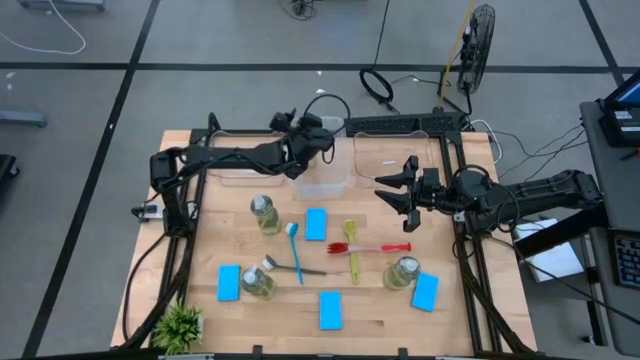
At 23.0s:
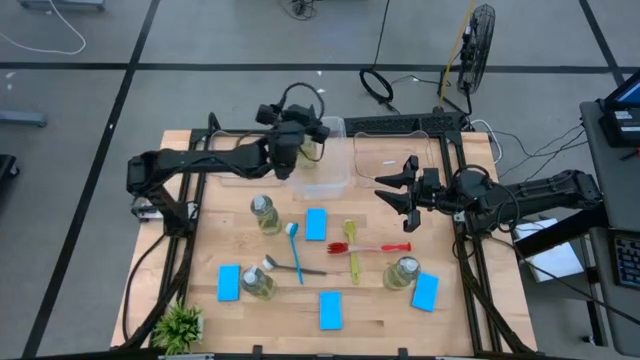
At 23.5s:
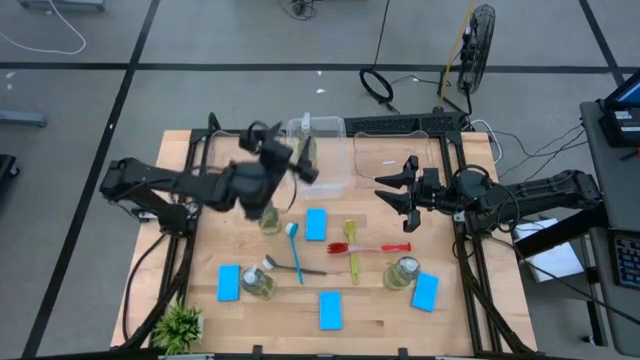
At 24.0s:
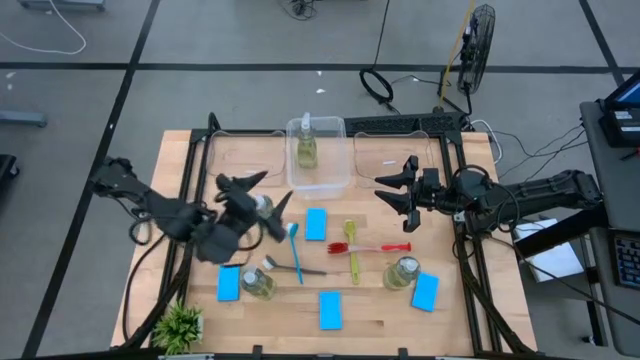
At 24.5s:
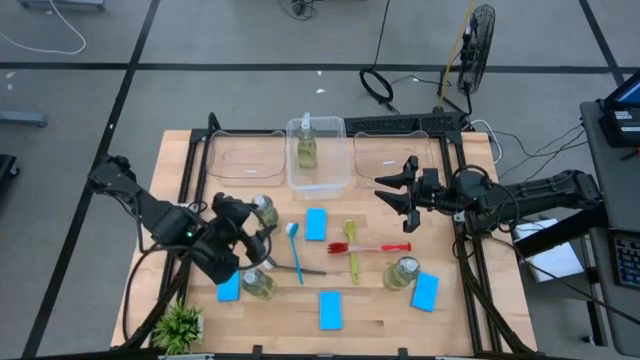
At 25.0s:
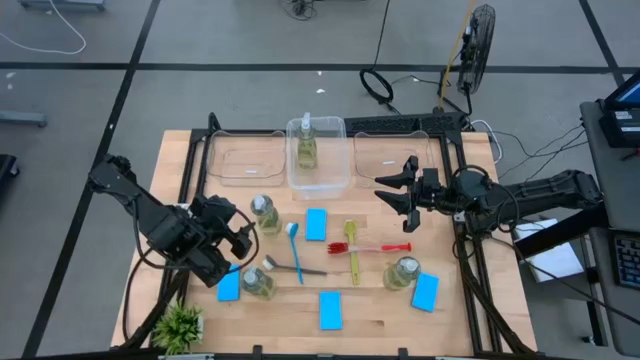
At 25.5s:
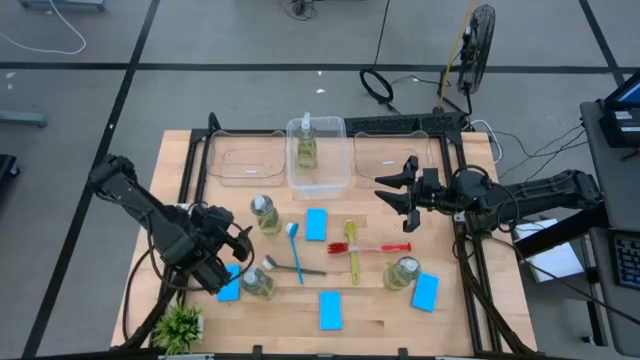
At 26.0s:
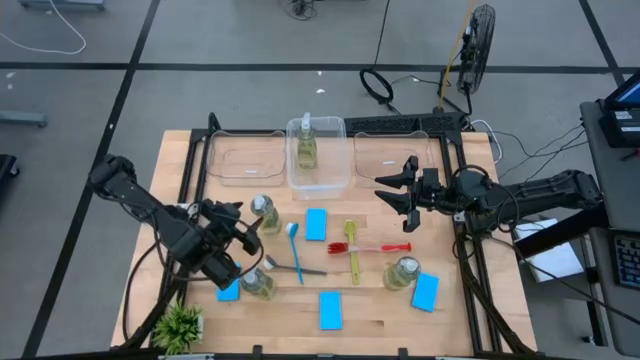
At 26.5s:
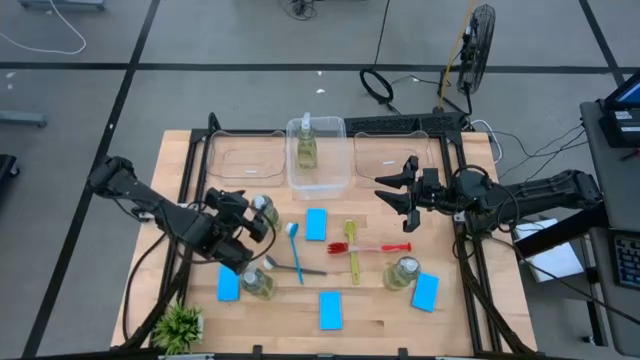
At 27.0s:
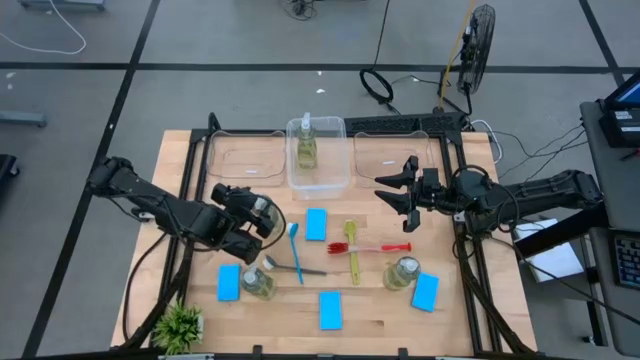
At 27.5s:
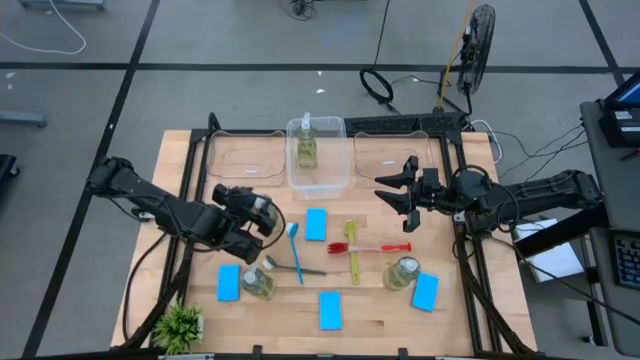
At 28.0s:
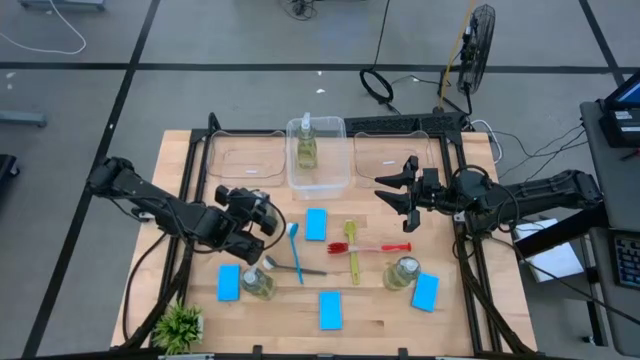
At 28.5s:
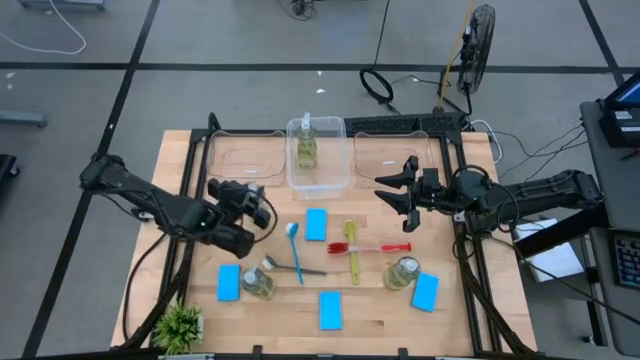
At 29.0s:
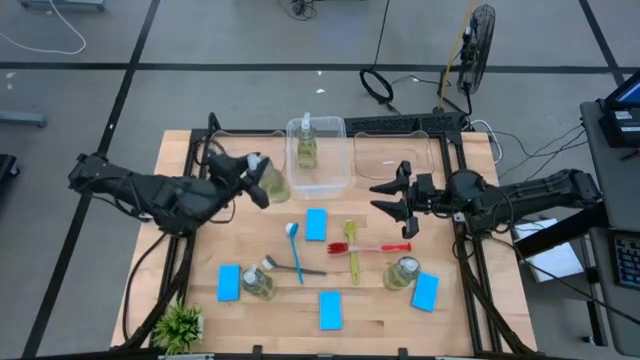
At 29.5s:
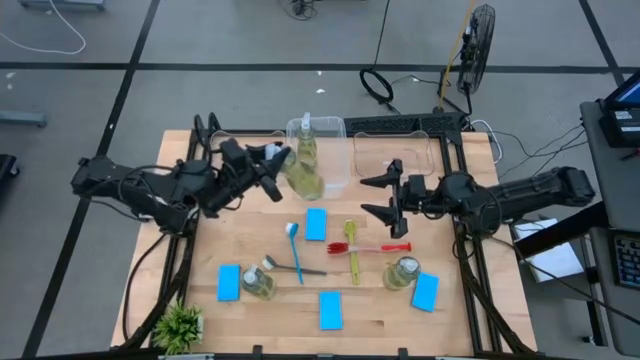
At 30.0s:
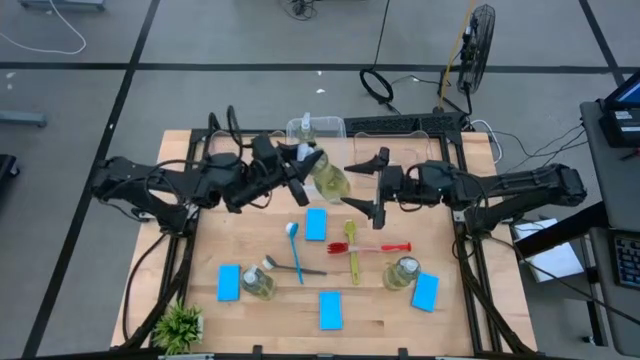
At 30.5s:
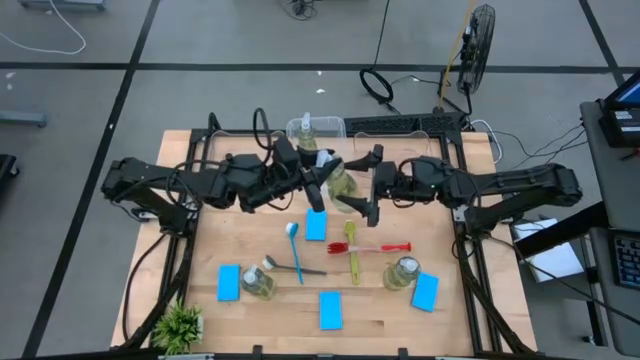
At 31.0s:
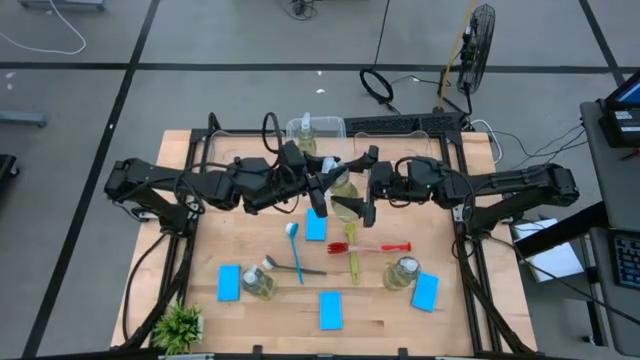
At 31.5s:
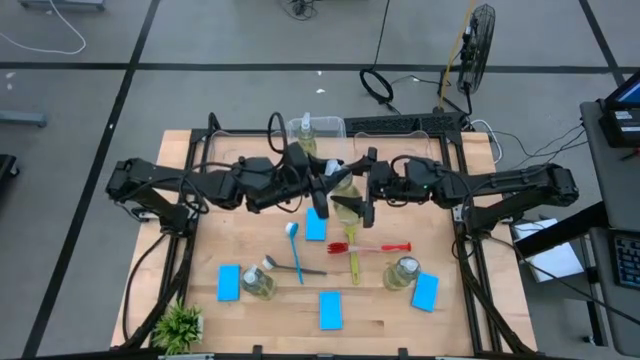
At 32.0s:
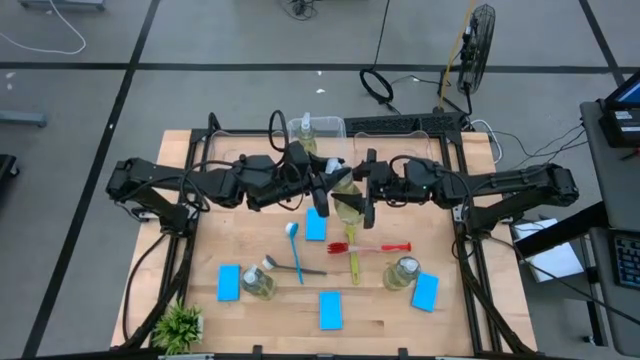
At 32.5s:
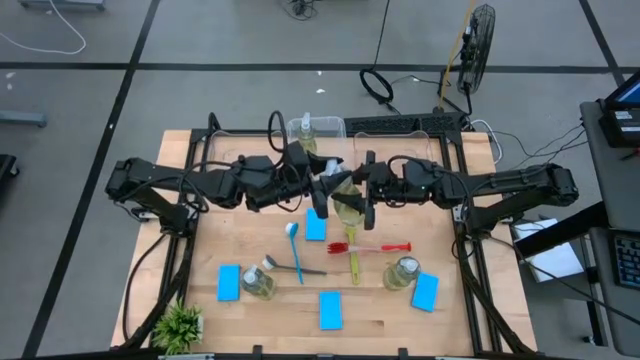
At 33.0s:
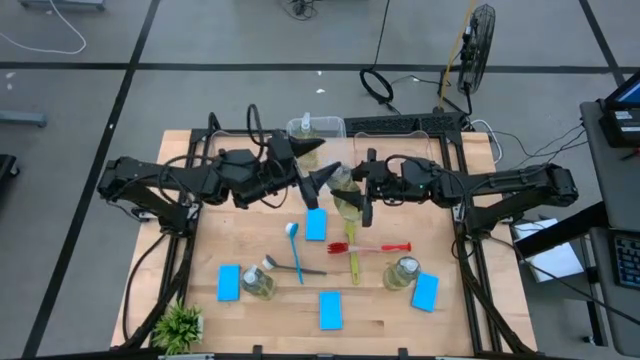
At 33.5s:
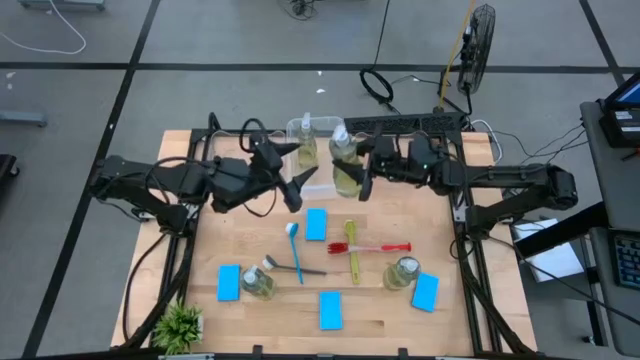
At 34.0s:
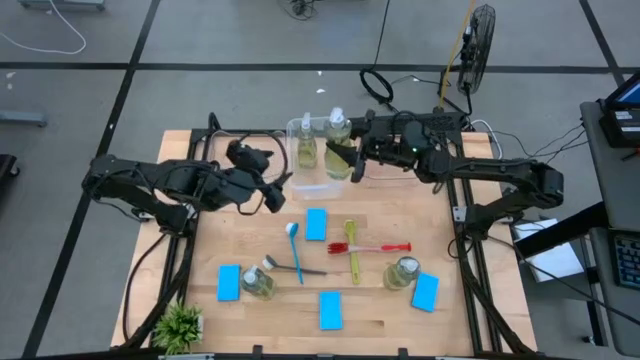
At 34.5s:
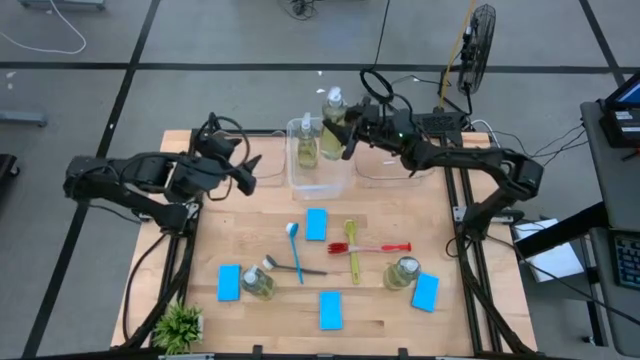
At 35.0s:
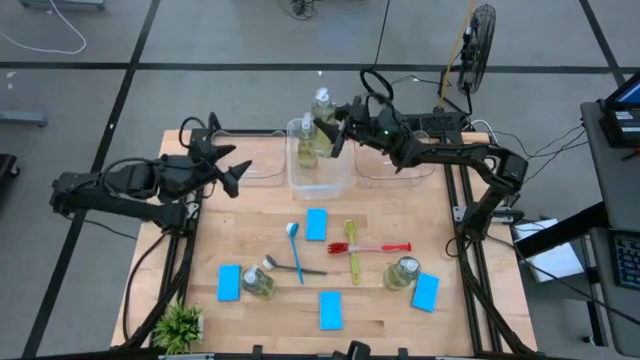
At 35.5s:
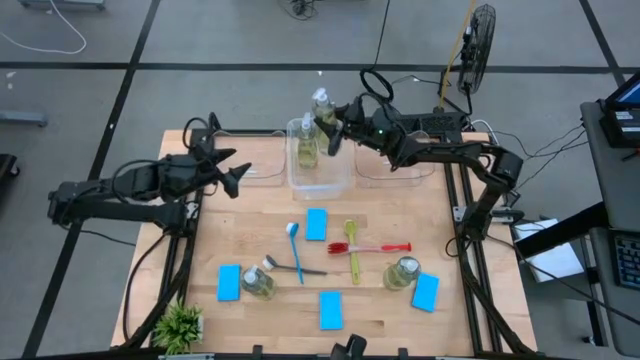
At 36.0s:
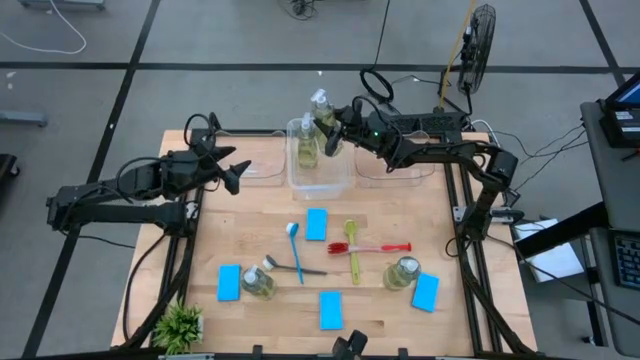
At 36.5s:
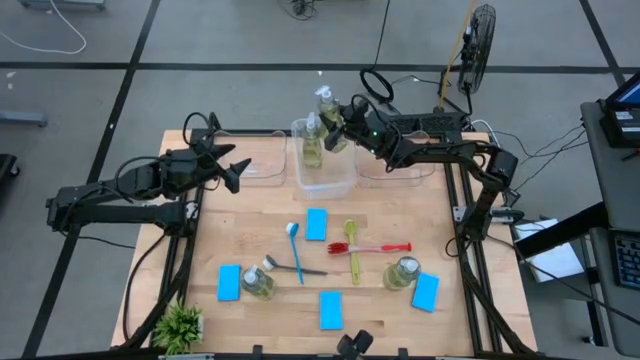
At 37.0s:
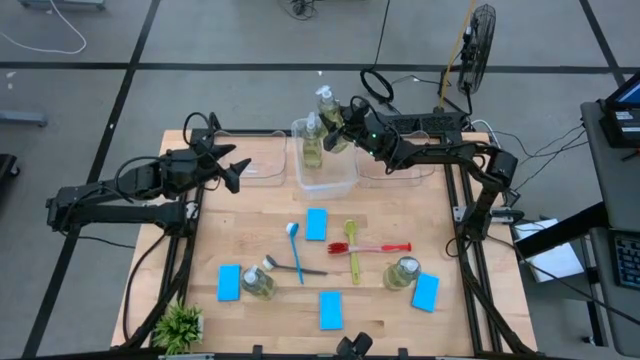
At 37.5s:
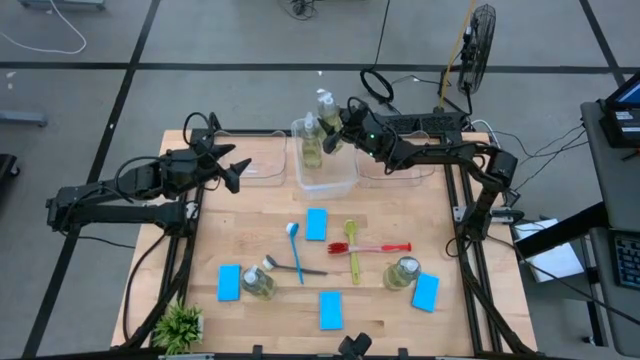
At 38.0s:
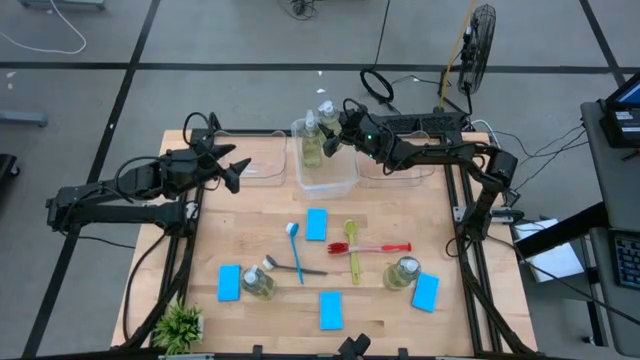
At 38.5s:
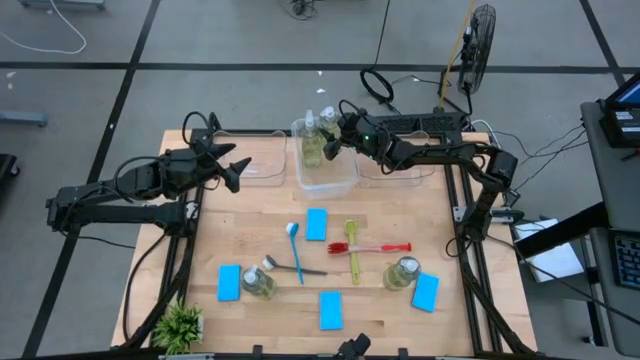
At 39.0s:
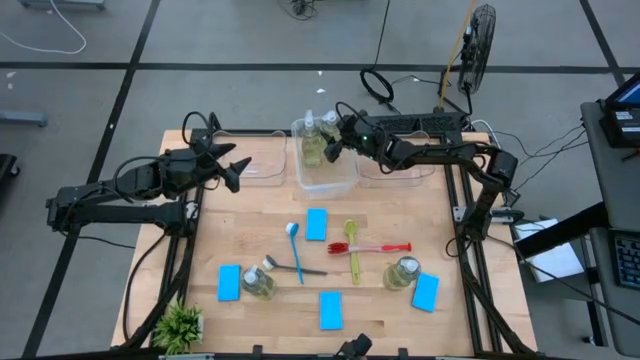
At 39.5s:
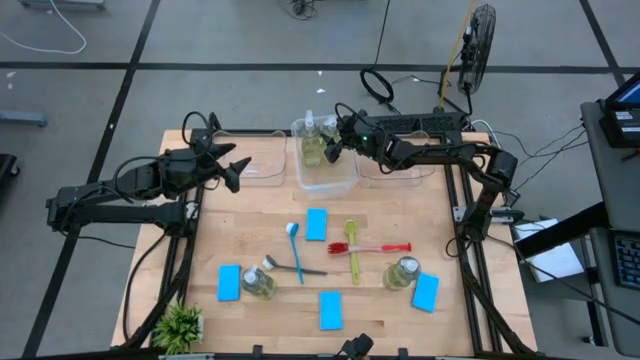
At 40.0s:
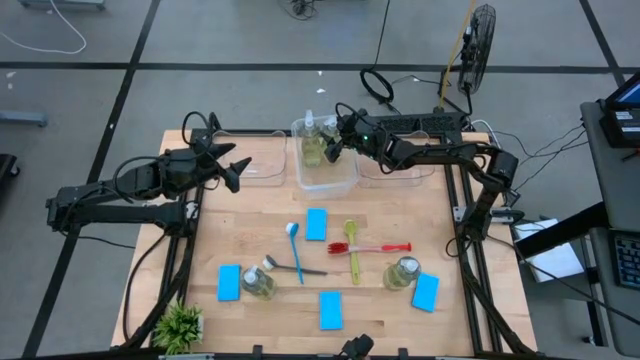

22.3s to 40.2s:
Task: Pick & Place Kitchen Sink Supplies
Put the yellow dish soap into the white bin

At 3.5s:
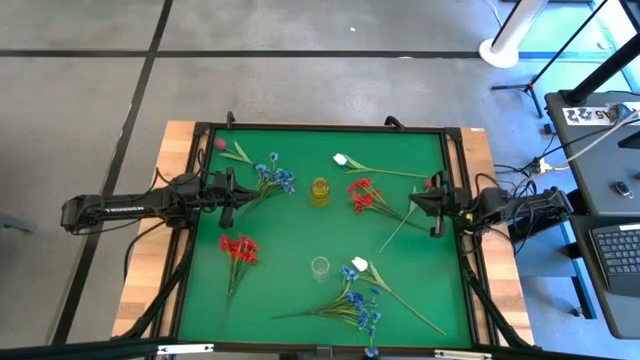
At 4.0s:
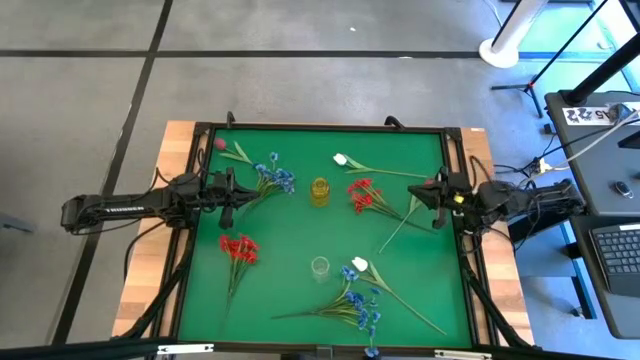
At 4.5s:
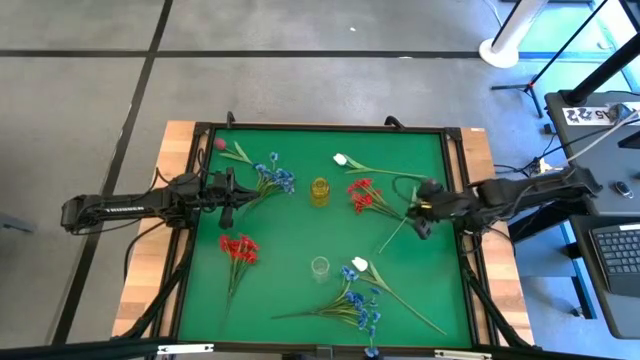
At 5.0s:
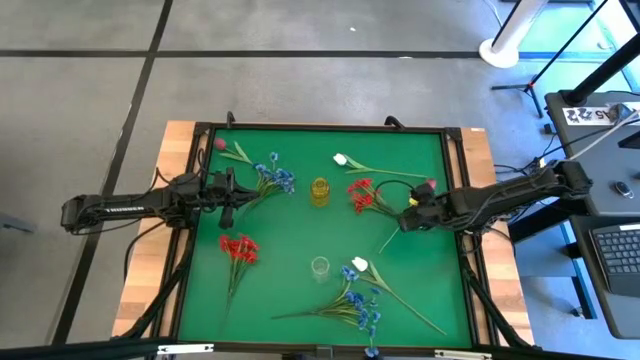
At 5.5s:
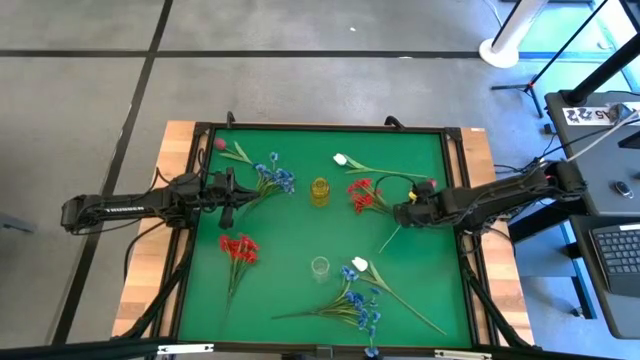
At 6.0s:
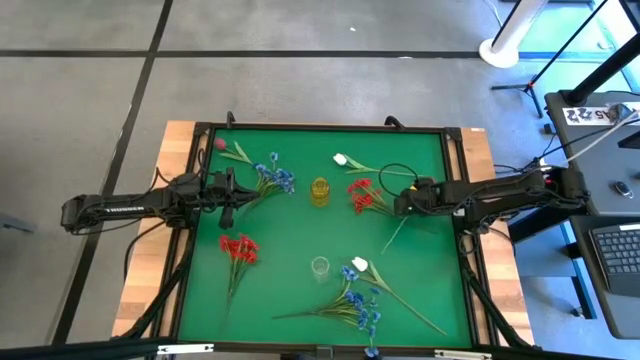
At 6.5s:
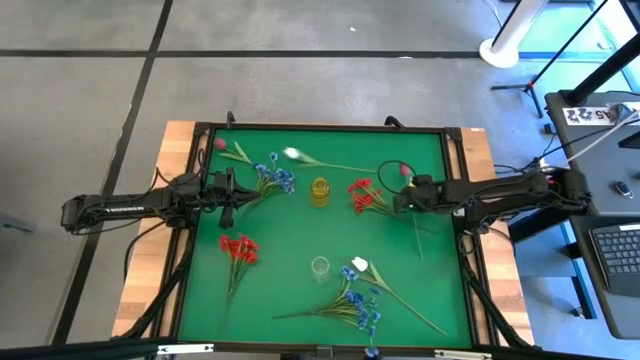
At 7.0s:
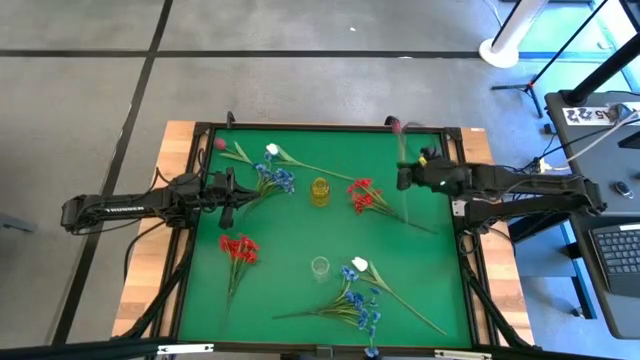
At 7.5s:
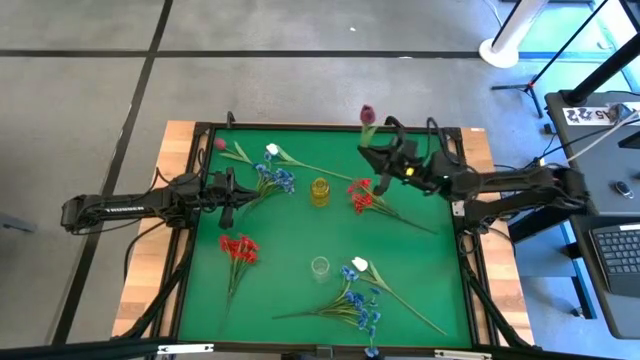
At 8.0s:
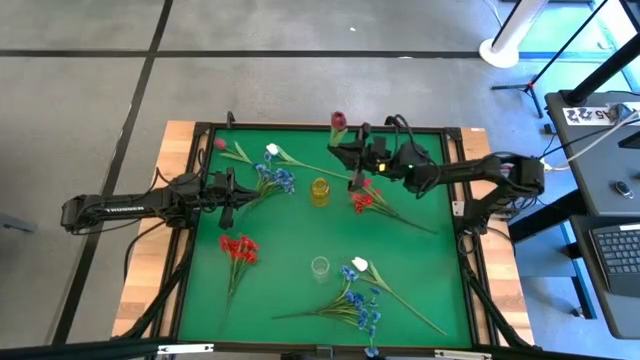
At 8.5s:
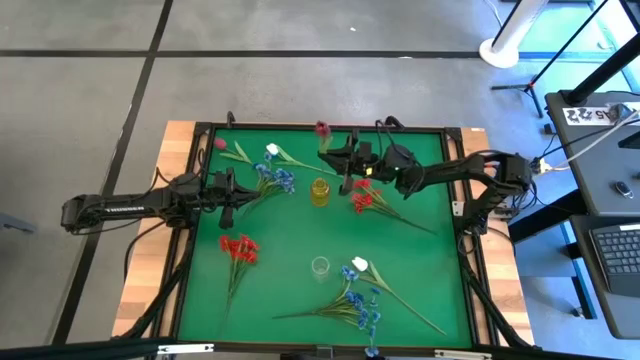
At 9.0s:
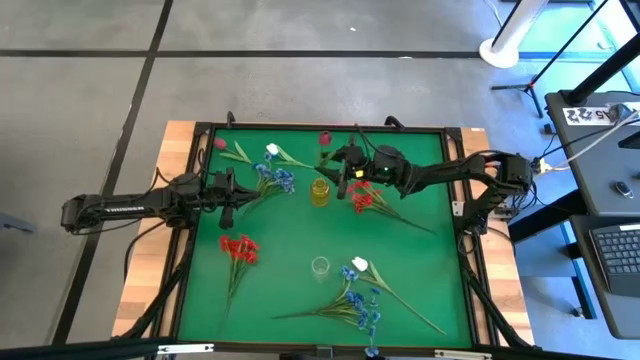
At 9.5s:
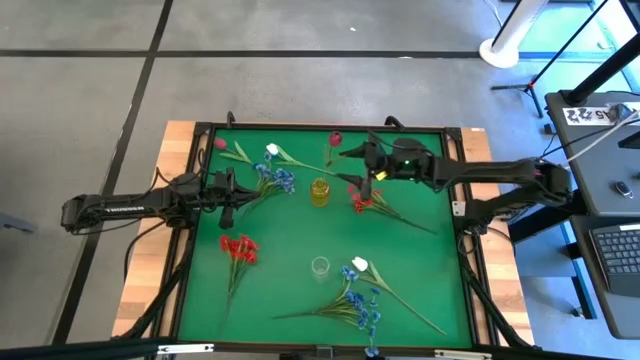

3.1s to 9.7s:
Task: Sort flowers into vase by color
Put the right red tulip into the yellow flower vase
